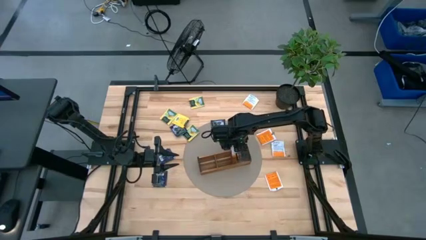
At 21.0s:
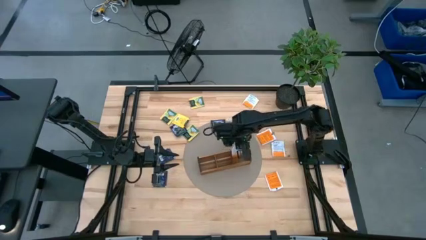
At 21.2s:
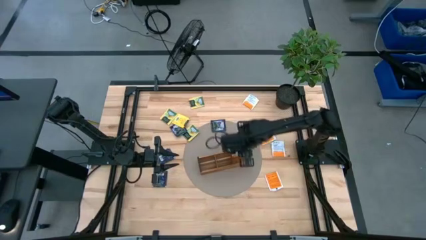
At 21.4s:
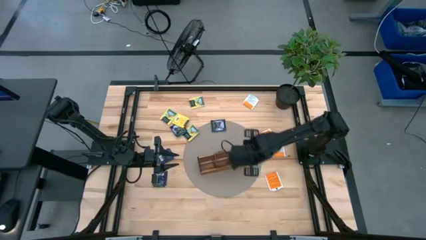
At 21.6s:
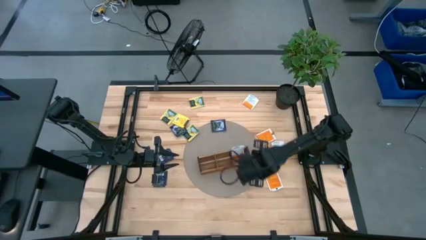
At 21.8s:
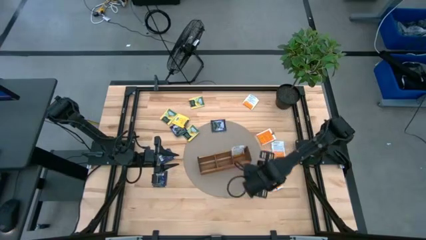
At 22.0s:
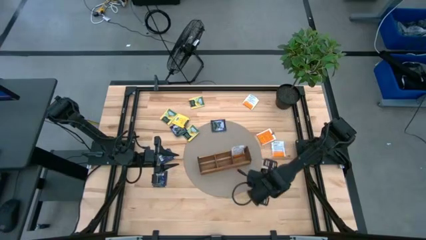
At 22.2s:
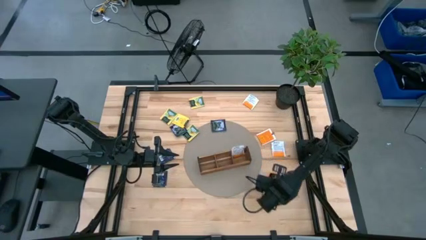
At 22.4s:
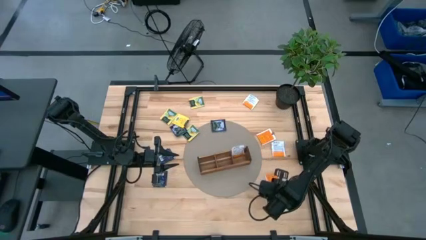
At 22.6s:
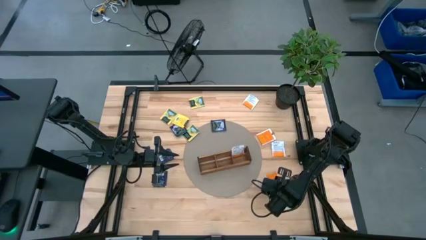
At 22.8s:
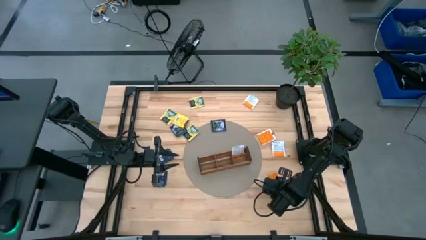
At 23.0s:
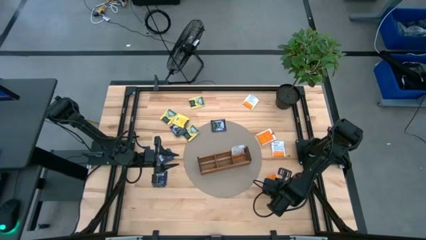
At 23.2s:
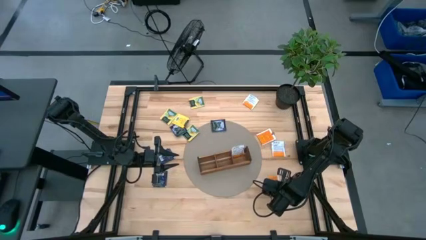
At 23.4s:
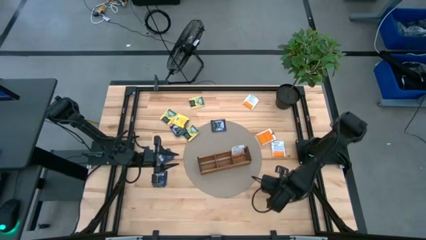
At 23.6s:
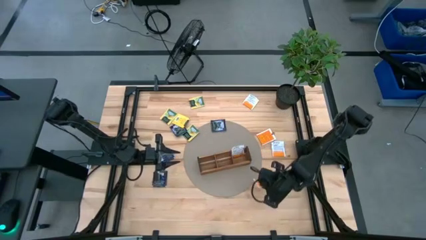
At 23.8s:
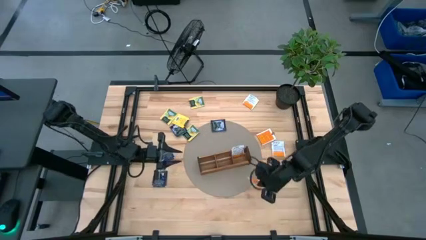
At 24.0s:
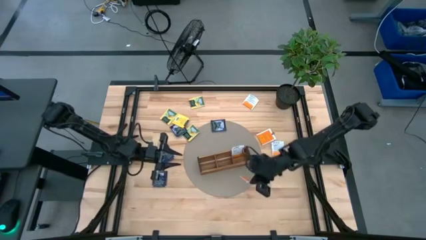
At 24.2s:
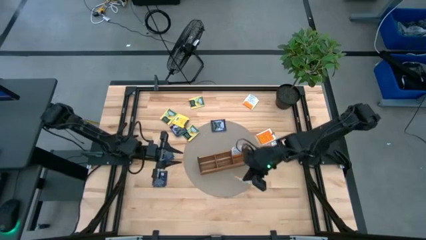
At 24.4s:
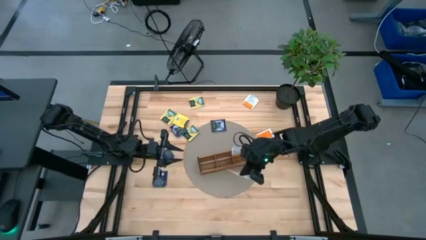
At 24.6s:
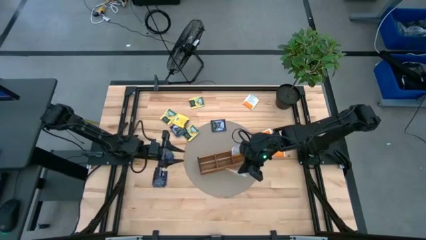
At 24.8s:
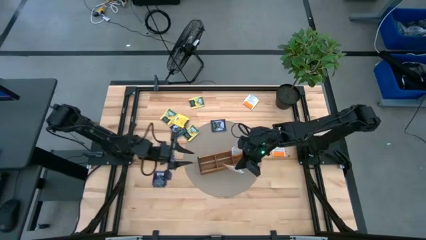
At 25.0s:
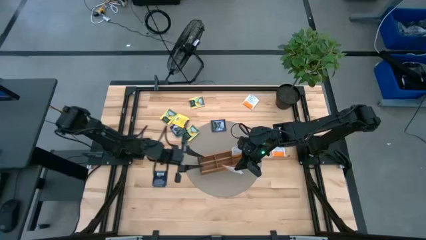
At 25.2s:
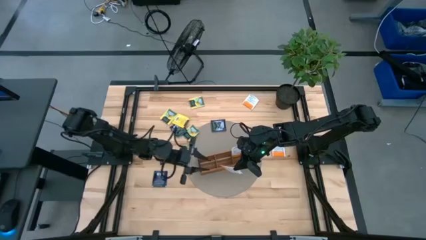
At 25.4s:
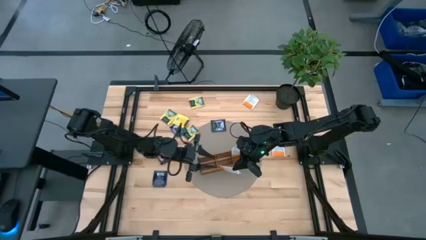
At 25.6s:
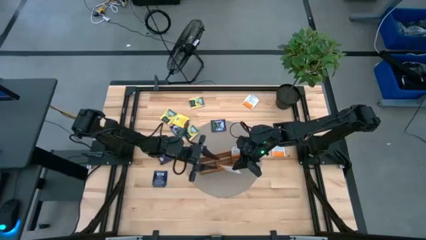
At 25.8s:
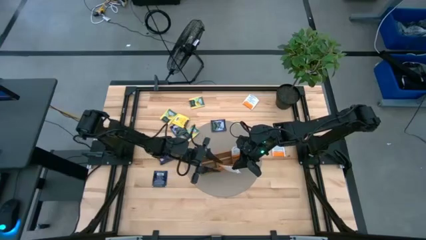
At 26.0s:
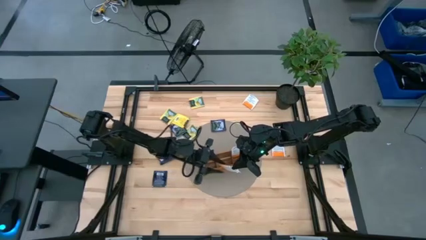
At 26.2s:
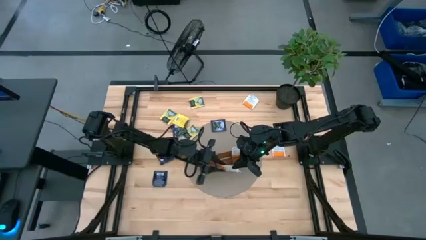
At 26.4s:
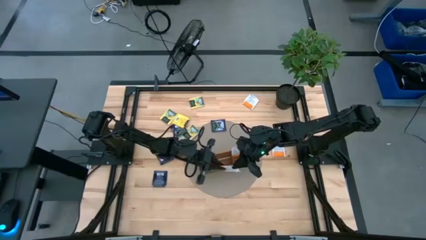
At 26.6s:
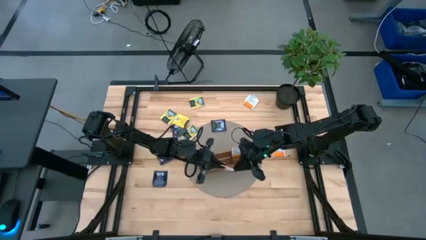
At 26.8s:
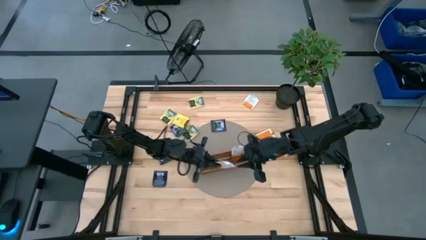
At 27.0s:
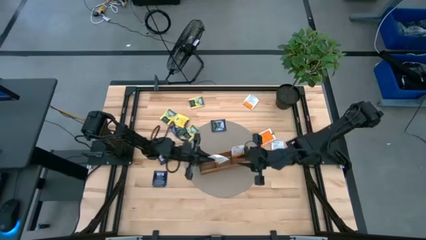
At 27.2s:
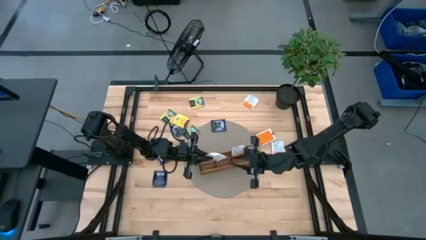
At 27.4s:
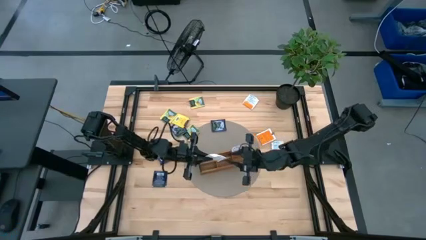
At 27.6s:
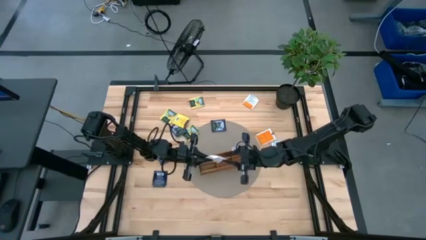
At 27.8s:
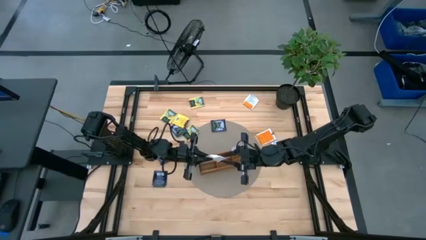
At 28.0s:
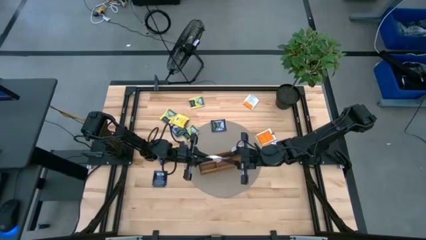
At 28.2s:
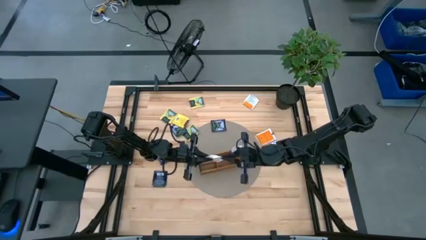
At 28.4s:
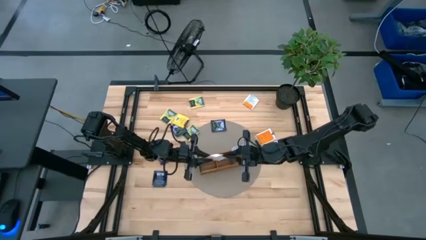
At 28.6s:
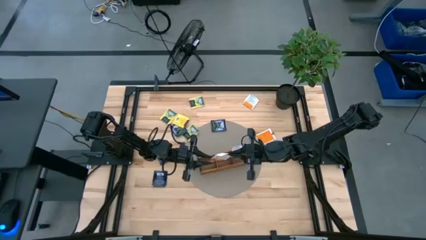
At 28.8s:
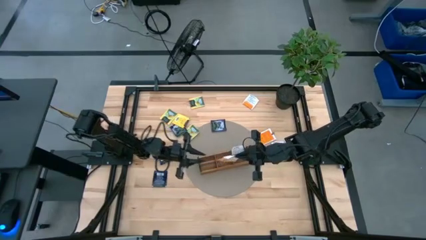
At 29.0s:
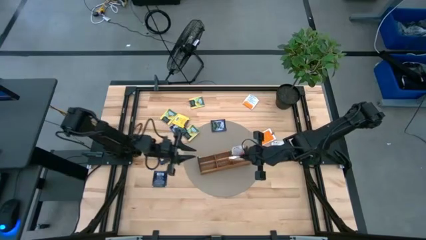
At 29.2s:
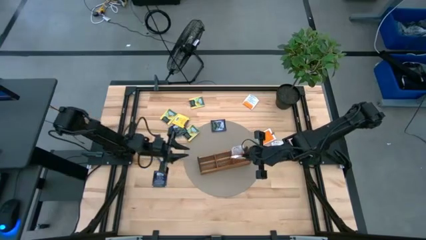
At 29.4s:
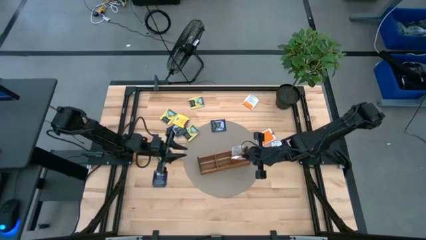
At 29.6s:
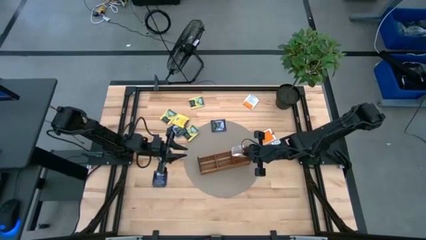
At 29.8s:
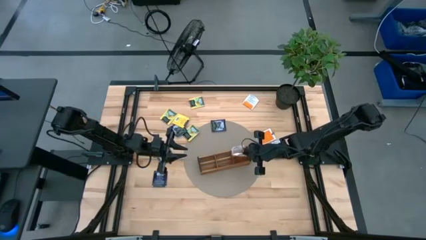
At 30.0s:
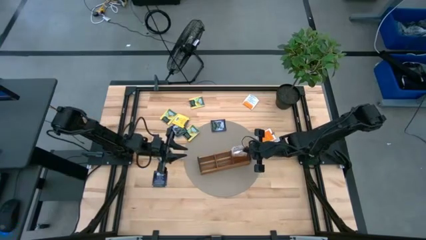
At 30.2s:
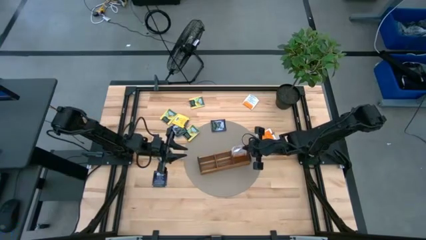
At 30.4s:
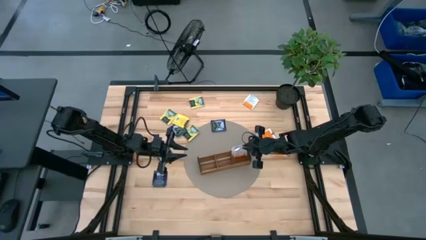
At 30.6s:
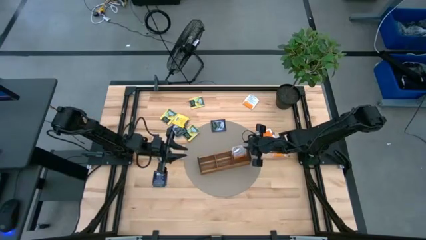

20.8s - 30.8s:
Task: Pick & Place Tea
Put the orange tea bag into the right section of the wooden organizer

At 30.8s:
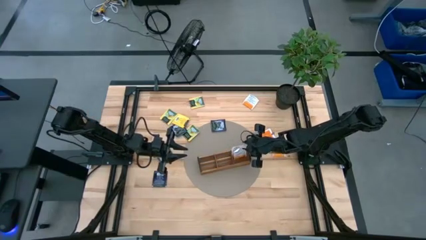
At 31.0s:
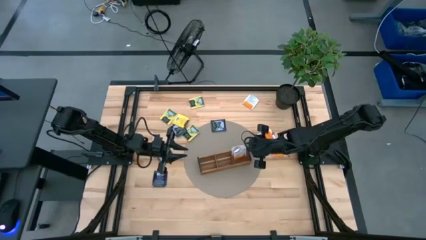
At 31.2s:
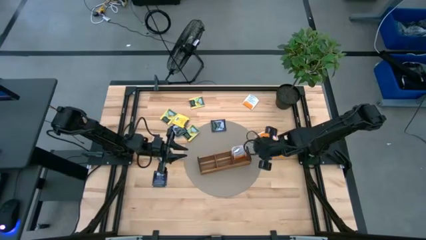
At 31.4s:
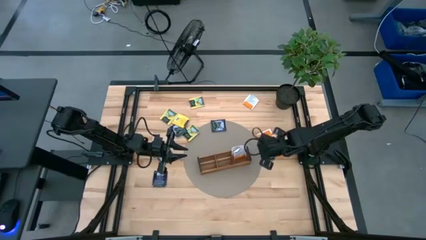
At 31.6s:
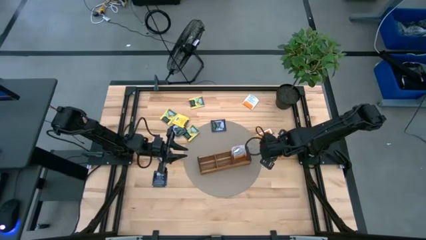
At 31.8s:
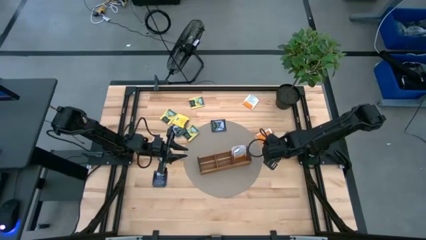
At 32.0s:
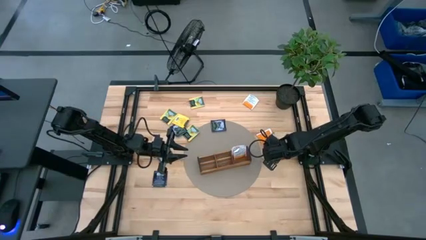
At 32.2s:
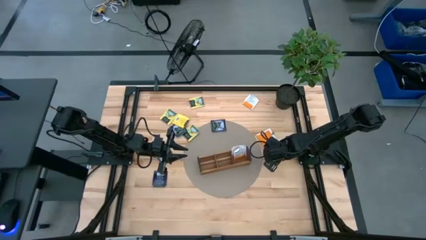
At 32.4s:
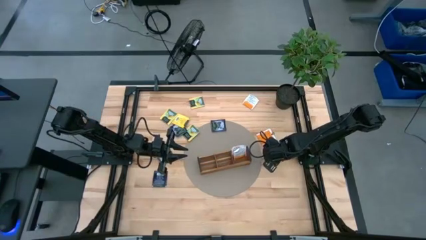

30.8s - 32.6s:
Put the orange tea bag into the right section of the wooden organizer

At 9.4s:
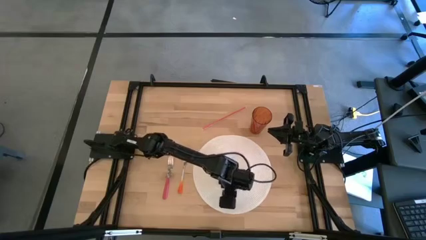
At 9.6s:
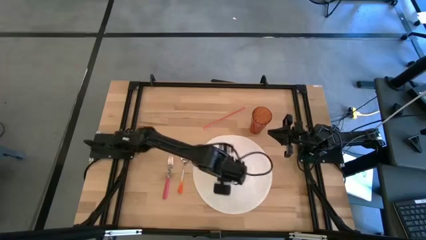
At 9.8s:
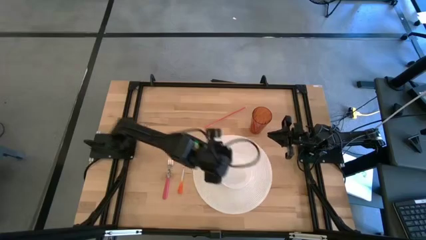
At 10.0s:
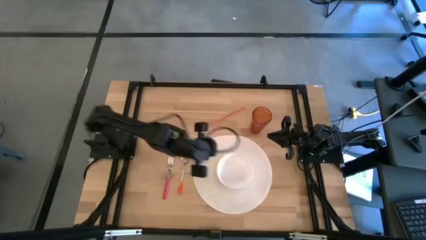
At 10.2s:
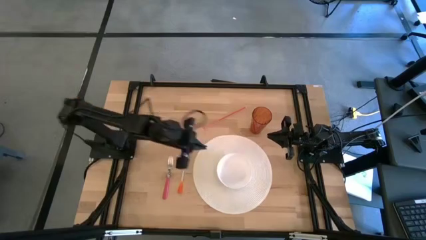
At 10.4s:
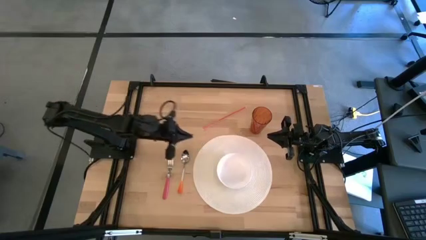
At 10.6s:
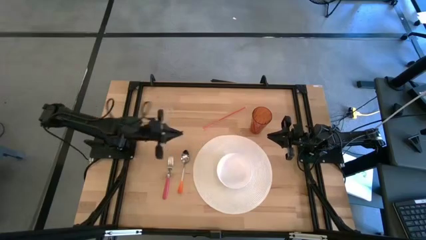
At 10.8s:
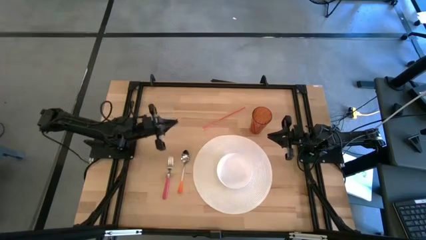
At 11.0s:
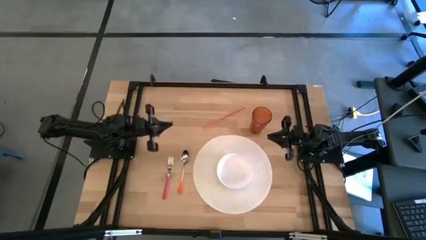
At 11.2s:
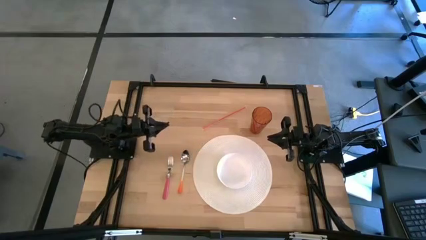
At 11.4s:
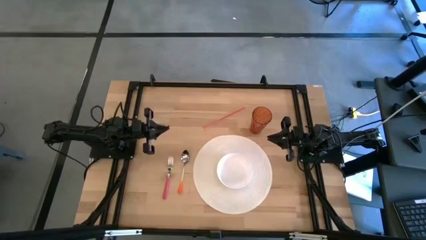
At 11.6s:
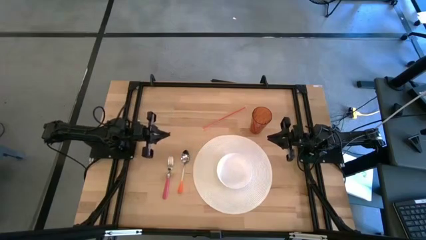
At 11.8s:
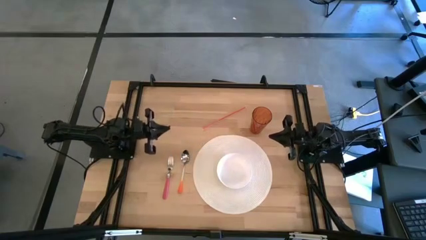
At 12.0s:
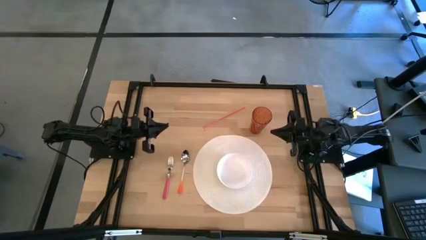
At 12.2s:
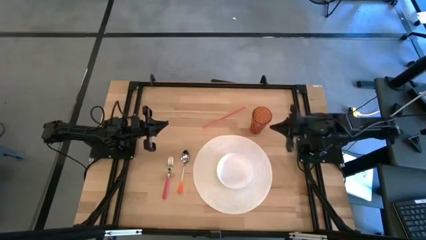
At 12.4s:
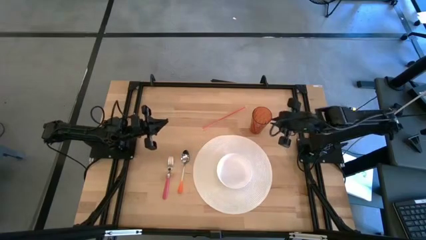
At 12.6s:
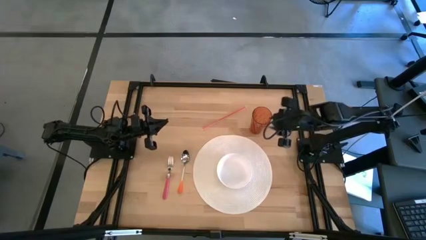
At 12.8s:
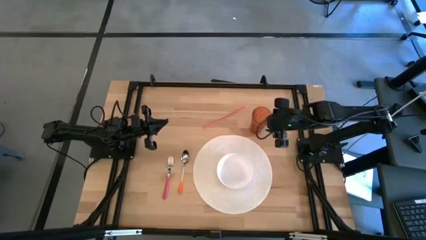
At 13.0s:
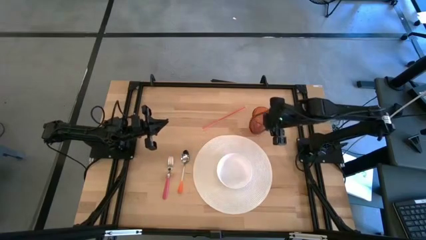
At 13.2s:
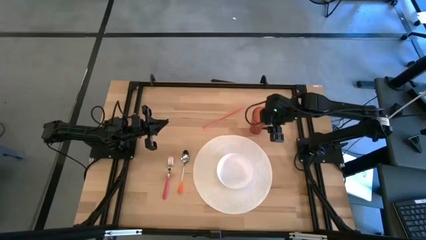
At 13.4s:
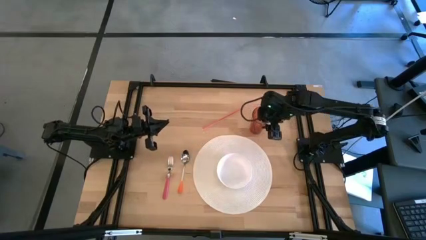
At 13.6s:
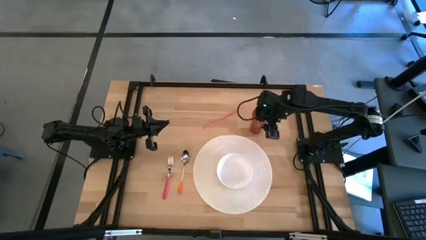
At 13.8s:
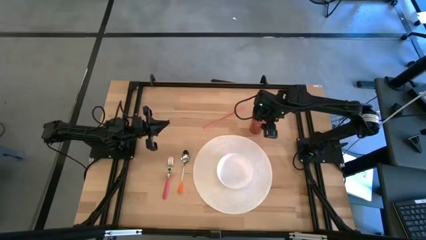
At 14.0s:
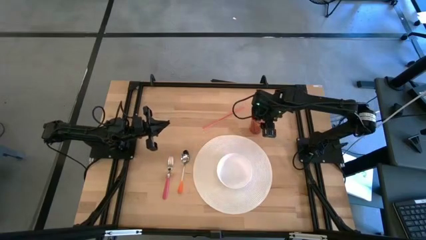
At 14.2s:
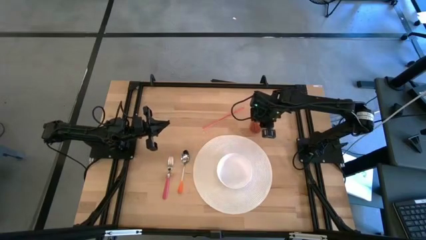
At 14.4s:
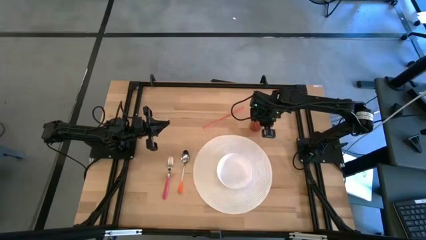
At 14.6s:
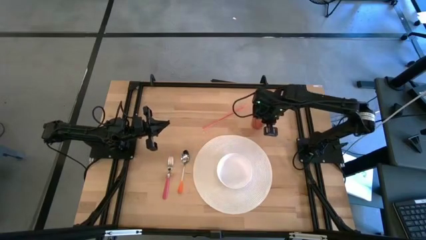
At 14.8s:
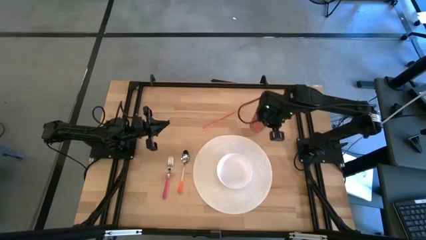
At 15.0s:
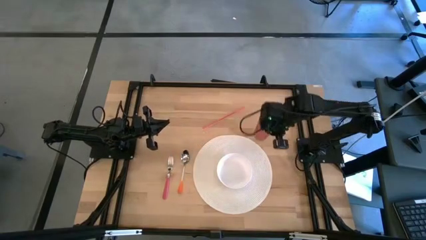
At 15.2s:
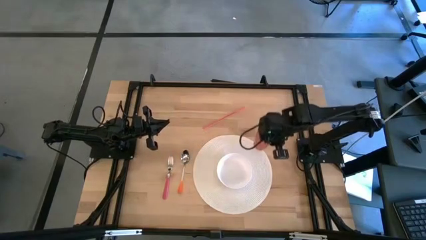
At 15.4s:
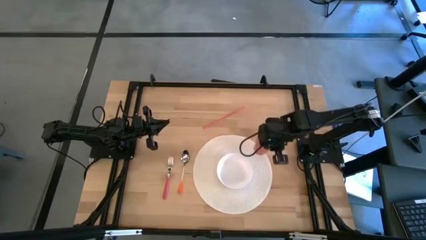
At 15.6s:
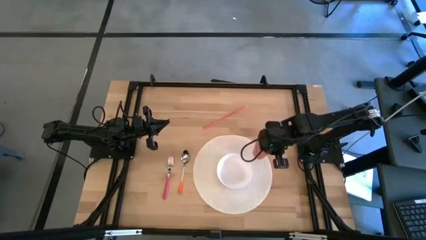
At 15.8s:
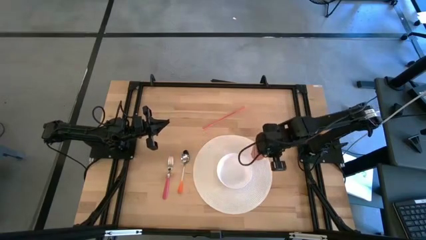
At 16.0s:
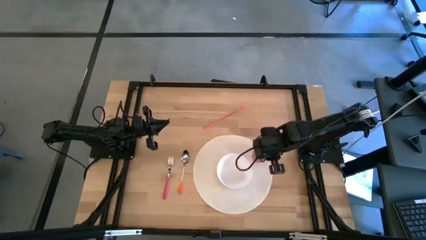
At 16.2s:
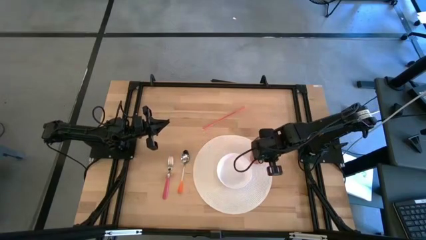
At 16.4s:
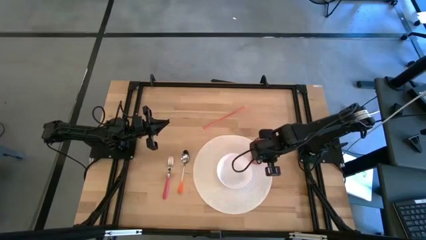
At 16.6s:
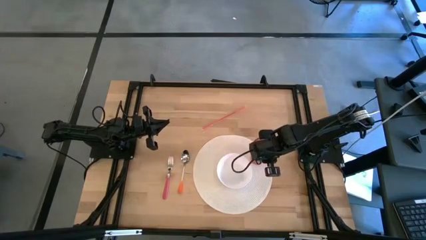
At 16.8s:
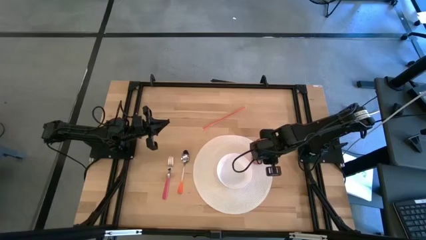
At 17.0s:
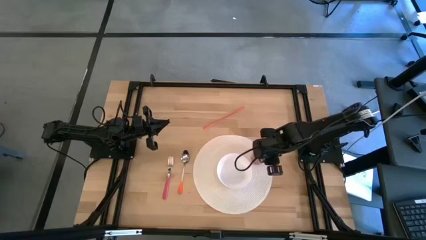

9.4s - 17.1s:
Task: Pick & Place Utensil
Put the orange cup on the white mat to the top right of the white bowl
